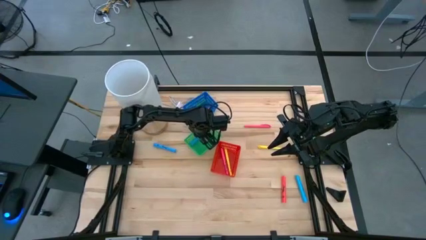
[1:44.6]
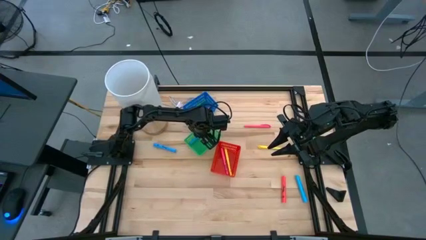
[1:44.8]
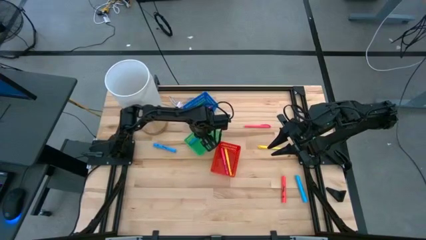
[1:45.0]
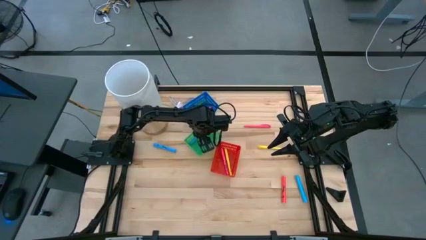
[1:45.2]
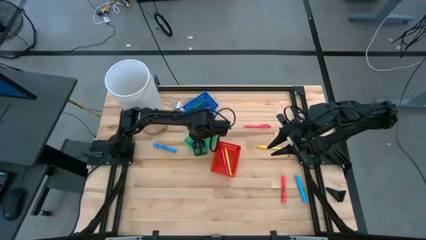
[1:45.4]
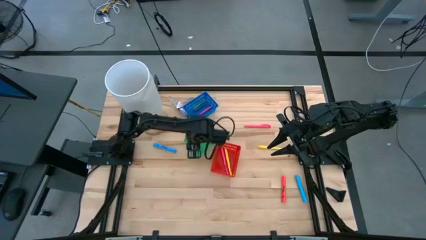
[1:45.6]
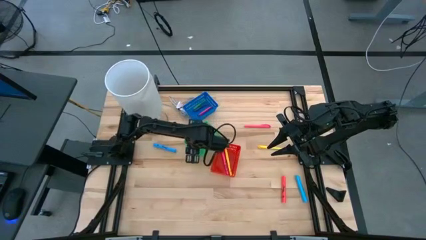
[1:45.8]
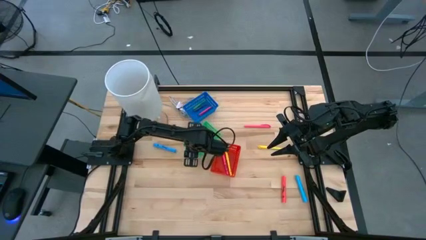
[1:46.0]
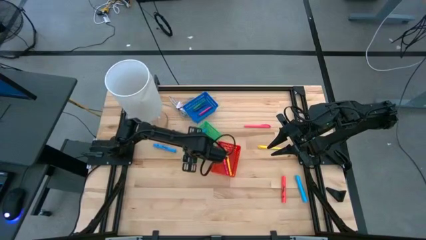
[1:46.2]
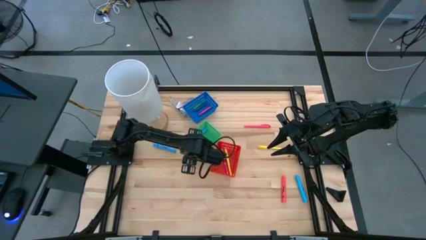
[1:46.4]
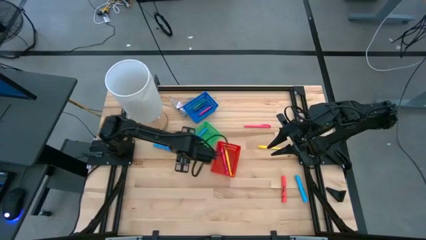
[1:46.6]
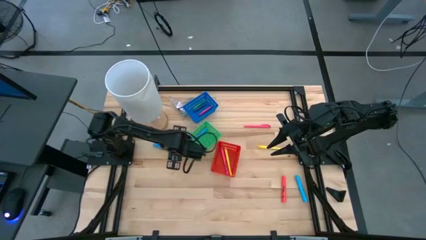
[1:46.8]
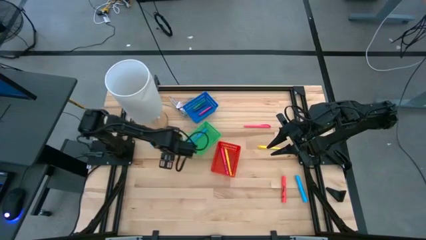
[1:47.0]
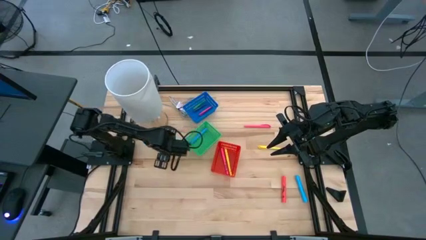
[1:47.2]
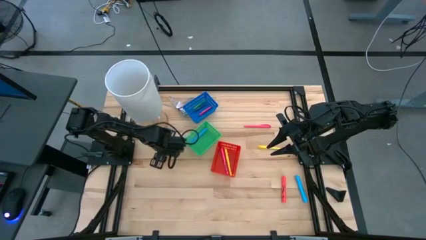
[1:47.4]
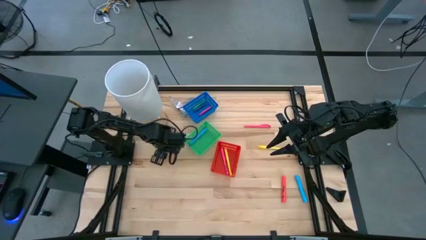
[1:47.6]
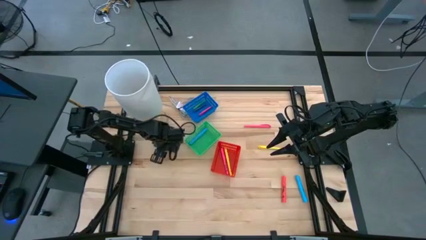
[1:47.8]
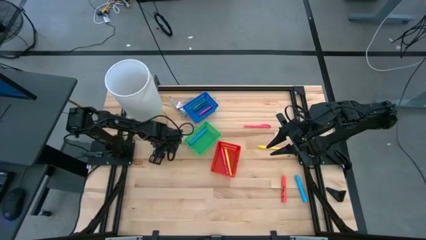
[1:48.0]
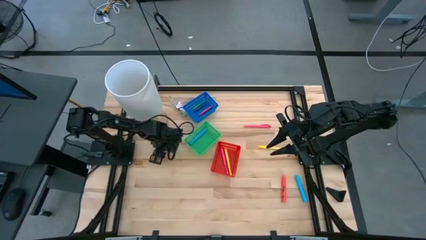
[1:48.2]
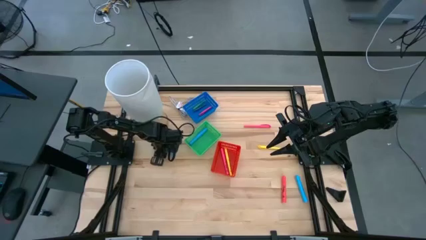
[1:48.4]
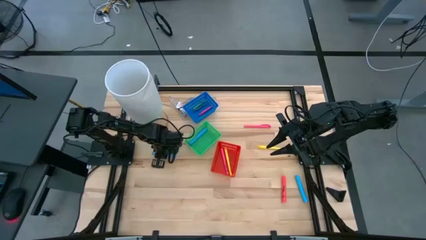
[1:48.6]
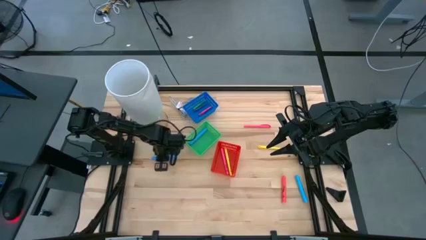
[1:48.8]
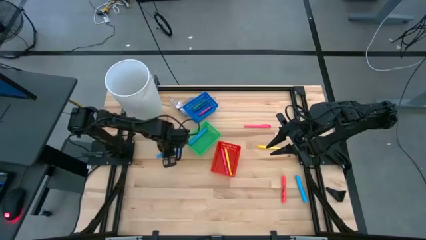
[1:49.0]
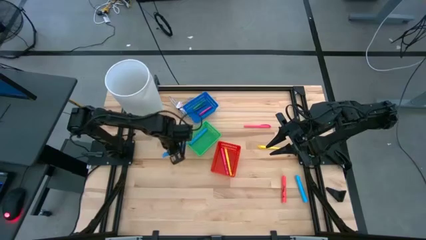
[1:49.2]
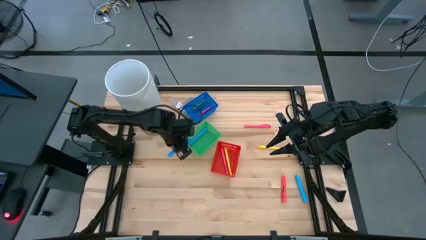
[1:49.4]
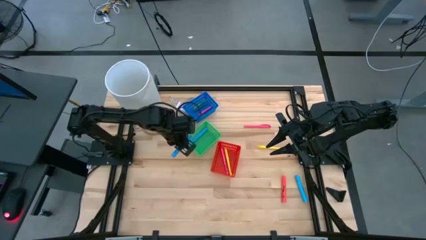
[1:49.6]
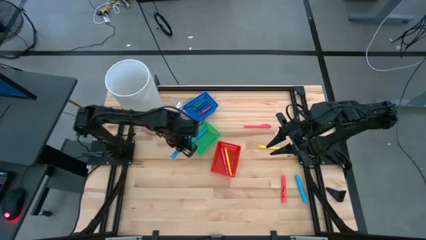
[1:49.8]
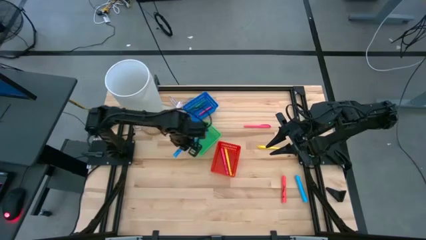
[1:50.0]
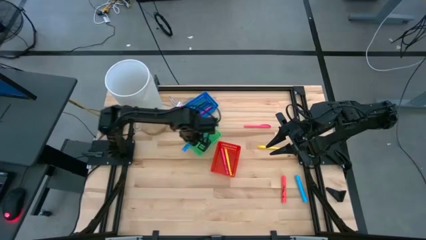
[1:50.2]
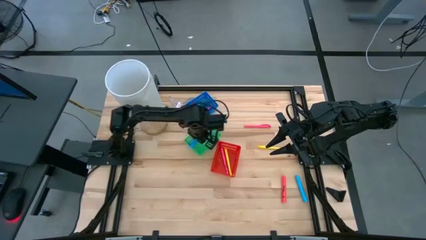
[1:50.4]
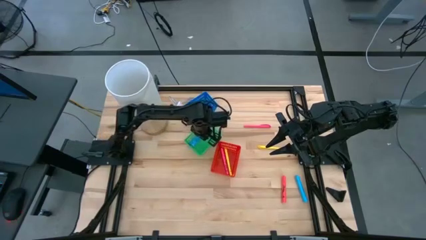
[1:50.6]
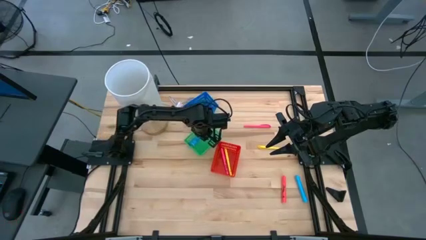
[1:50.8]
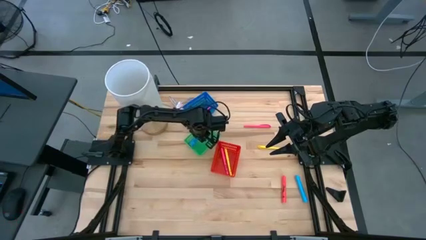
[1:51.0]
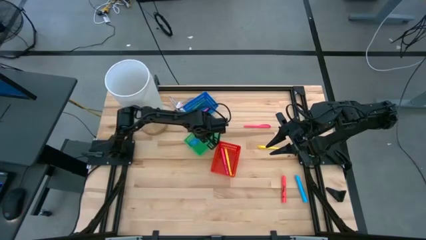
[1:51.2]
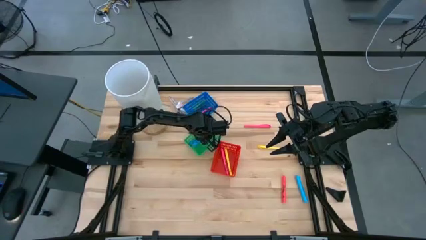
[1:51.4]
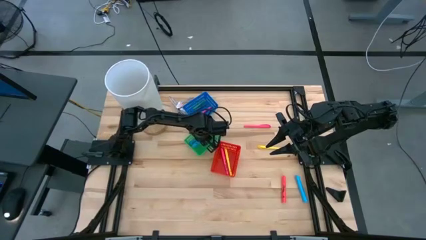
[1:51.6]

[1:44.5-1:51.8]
Task: Pick & Place Markers
Put the top blue highlighter pen into the green bin

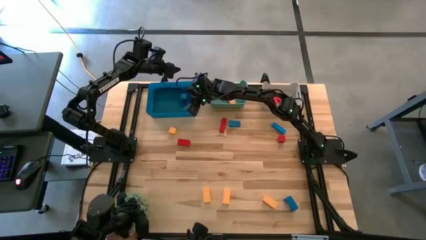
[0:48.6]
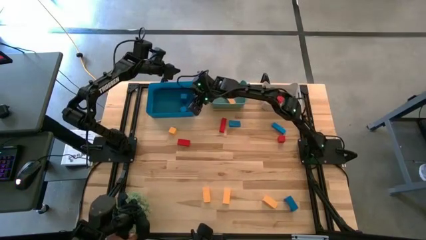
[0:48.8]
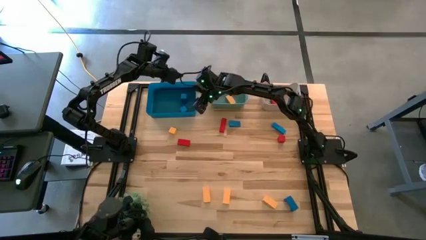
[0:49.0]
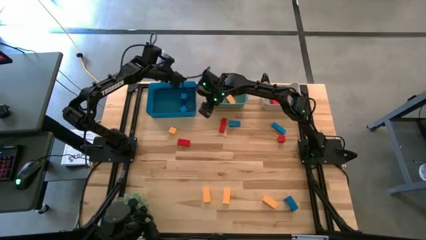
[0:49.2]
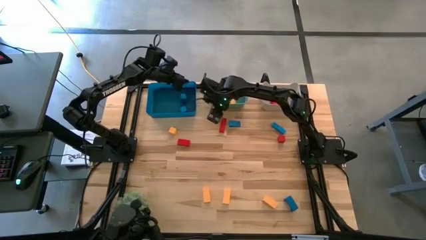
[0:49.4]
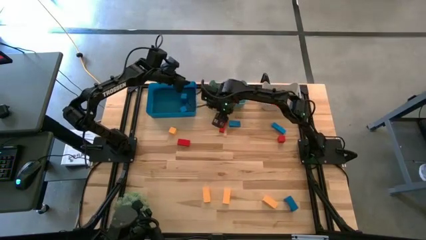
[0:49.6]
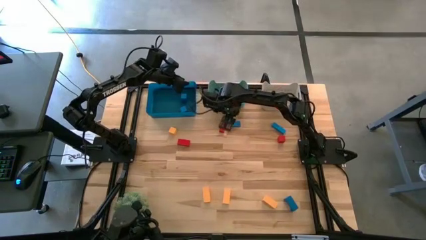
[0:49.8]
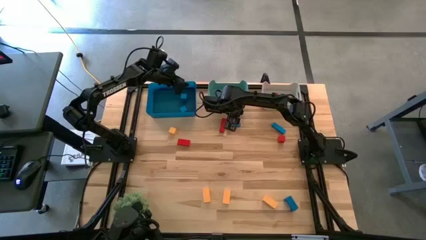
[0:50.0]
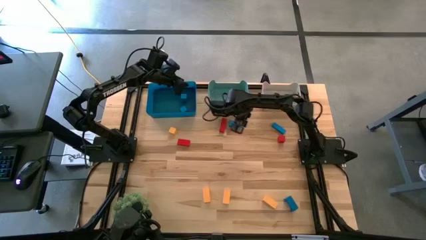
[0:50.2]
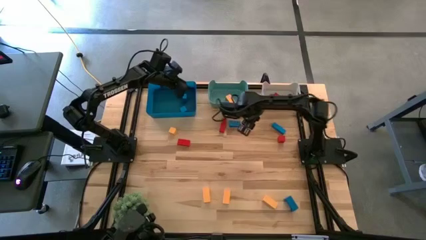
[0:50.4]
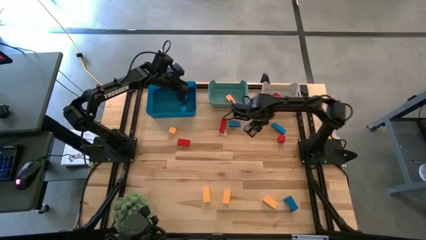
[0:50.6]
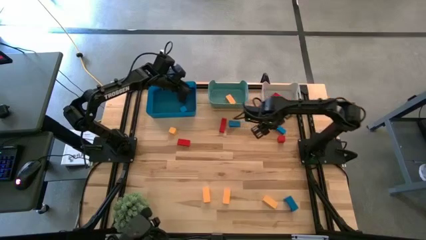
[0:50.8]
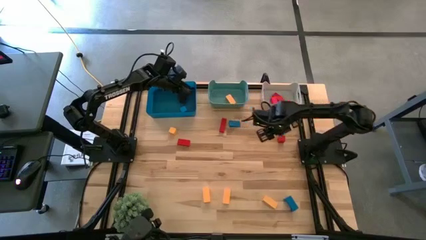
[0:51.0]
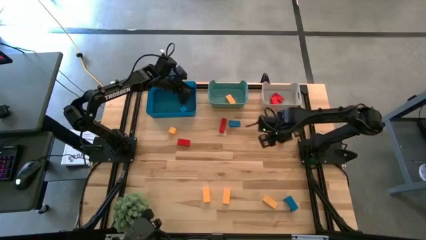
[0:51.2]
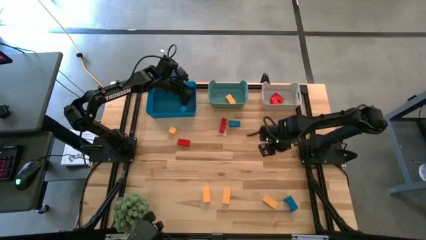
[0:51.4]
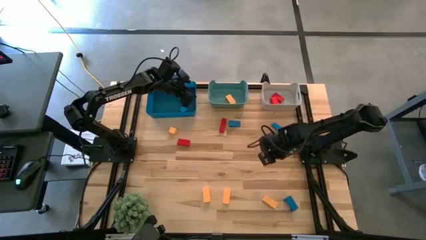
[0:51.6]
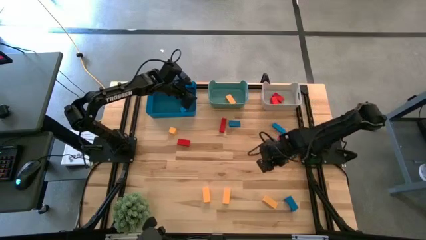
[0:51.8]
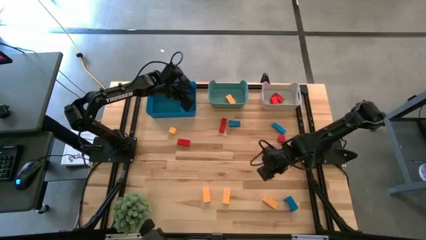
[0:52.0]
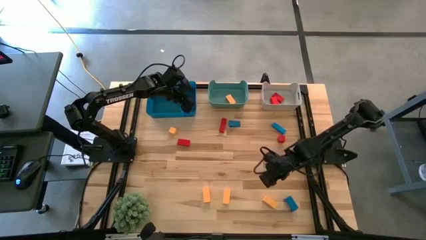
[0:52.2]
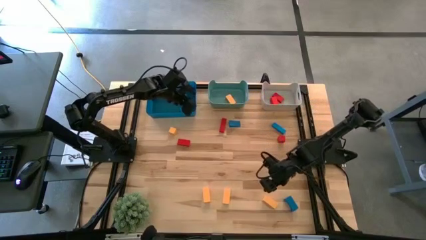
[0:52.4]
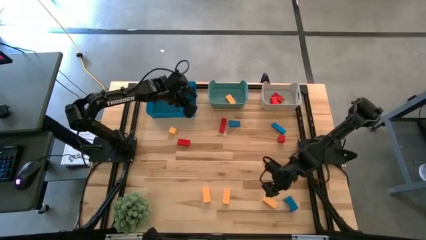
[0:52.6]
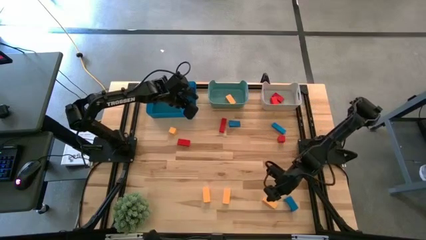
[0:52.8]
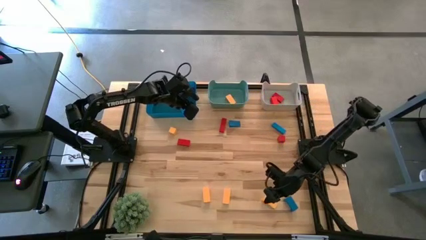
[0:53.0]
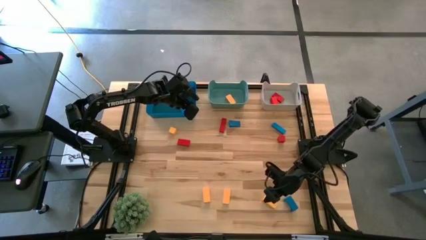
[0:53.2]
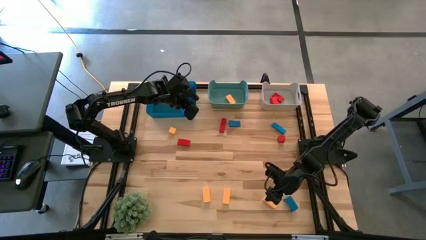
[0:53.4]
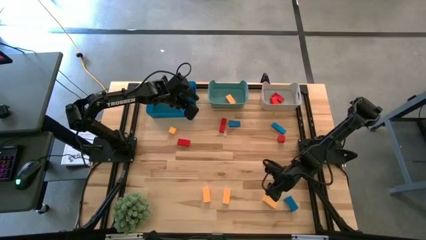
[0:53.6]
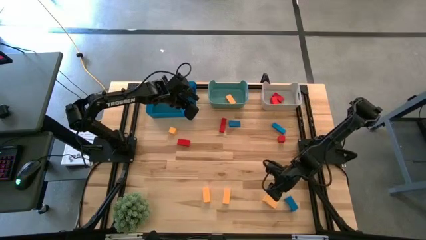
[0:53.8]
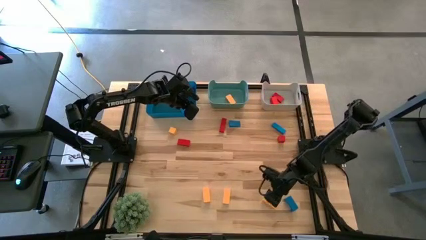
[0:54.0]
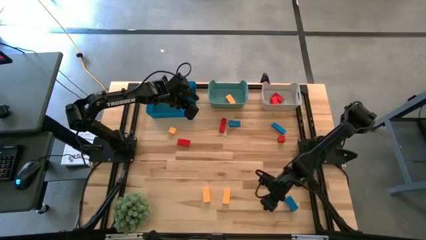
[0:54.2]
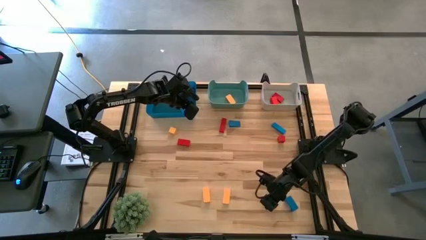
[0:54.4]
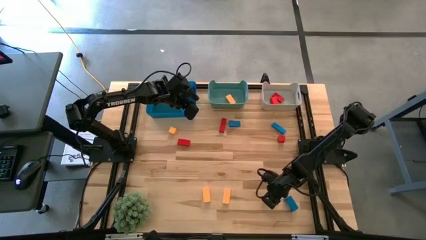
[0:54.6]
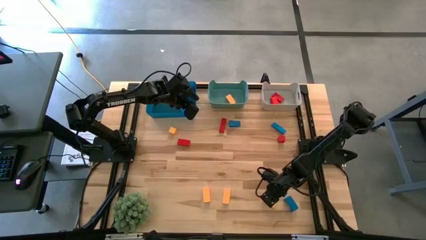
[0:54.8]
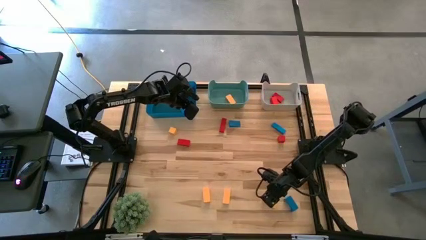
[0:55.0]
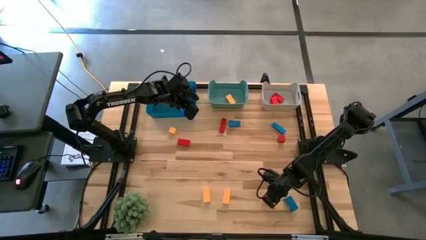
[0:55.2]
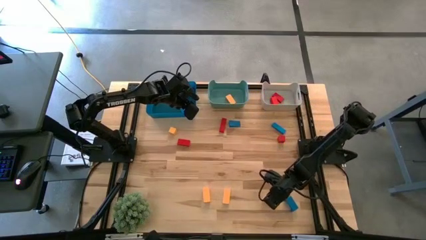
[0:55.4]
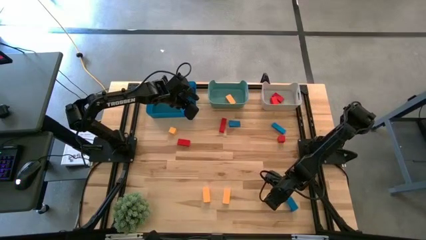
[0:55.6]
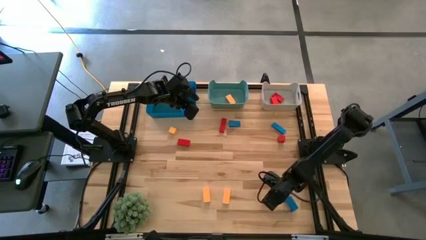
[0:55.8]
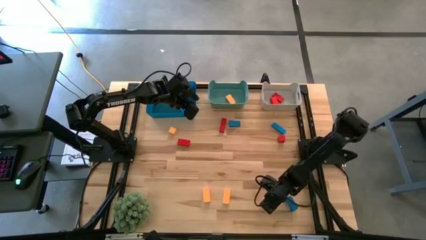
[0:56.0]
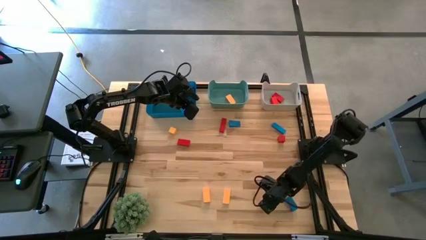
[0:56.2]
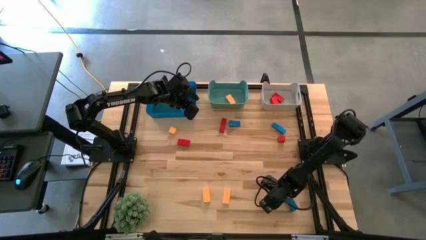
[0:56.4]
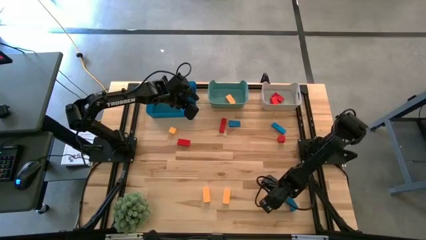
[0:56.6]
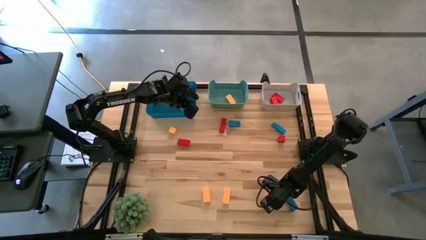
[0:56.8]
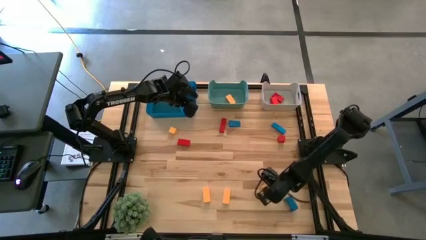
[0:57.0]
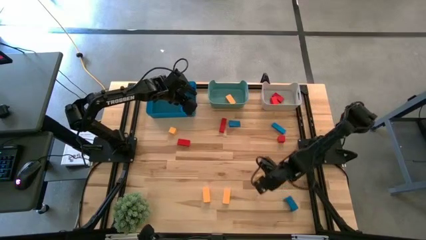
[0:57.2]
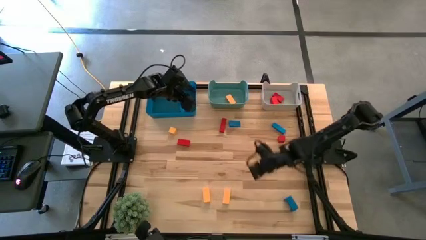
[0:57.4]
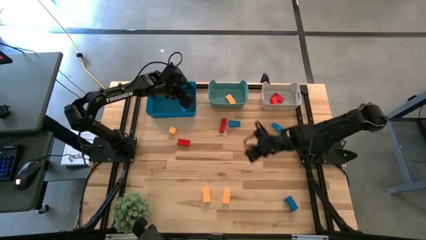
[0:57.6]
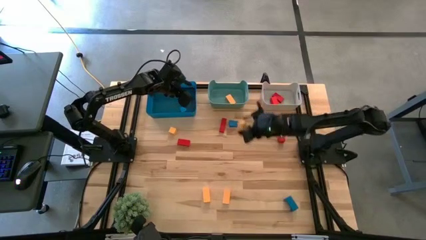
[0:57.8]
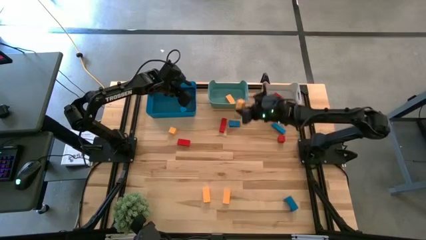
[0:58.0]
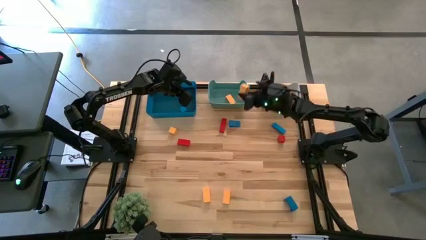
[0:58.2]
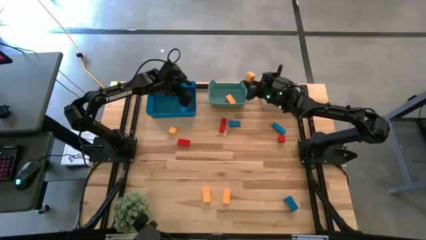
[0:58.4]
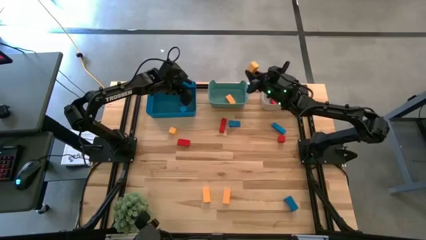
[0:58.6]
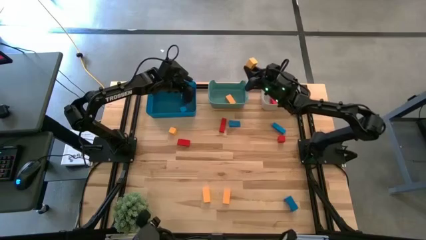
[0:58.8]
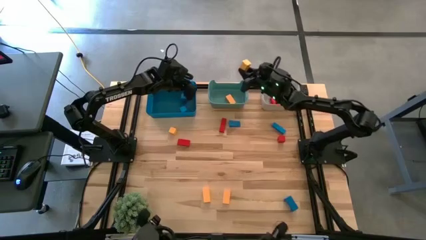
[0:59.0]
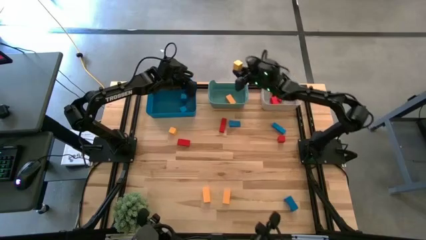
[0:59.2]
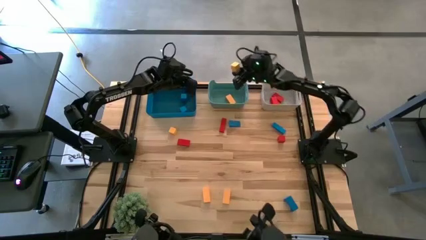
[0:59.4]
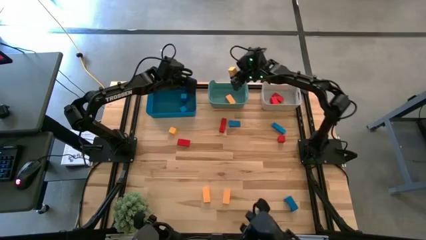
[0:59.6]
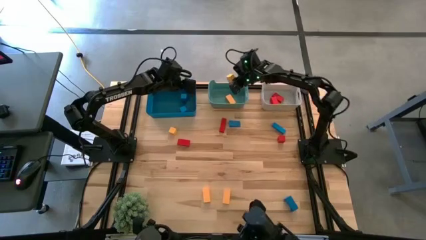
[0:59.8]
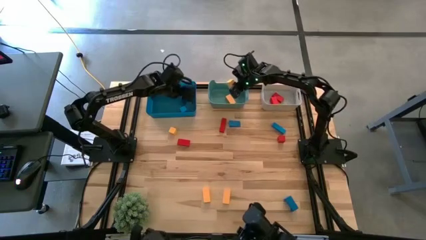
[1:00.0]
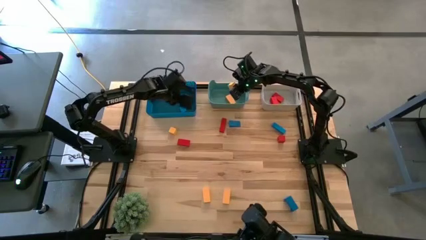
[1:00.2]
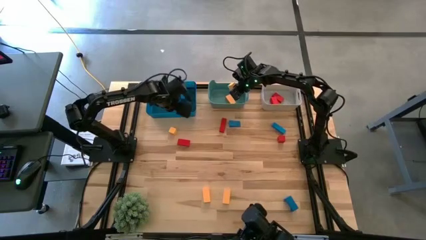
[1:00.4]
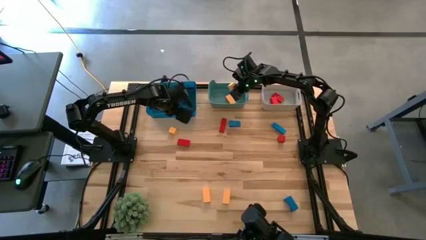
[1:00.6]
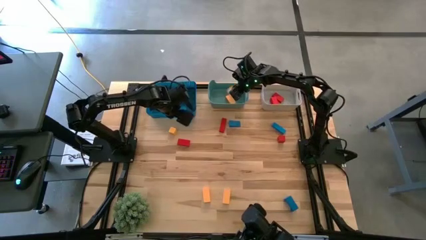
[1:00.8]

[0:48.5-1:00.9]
Task: Sort & place blocks by color
Put the yellow block into the green bin
